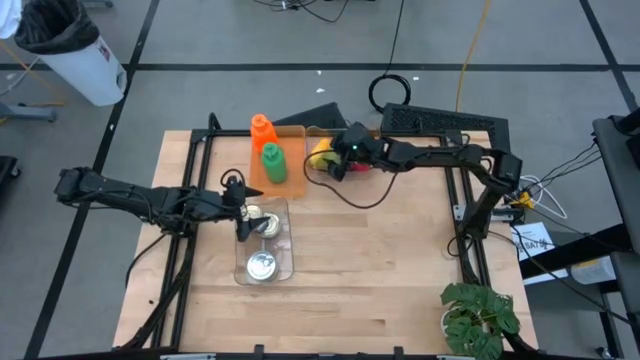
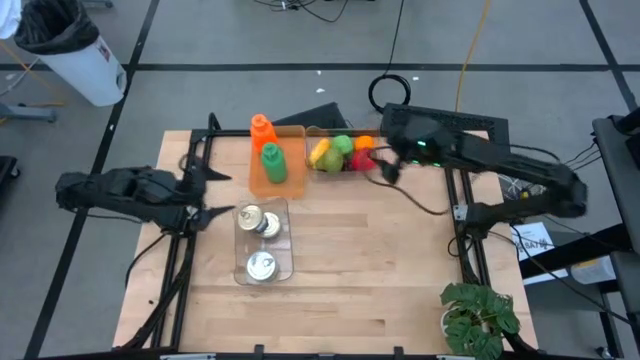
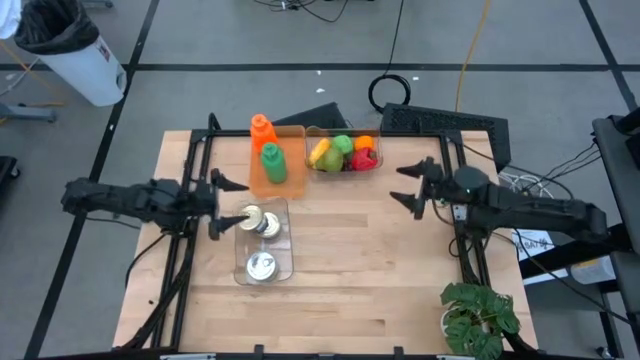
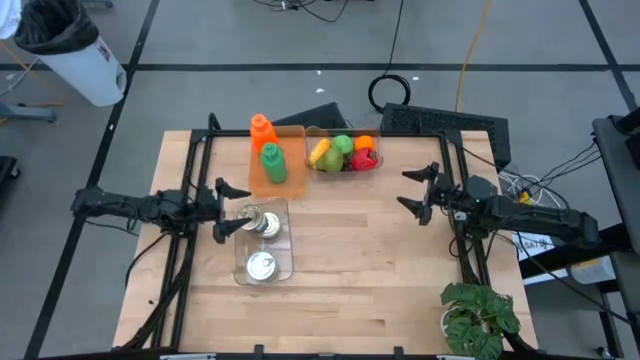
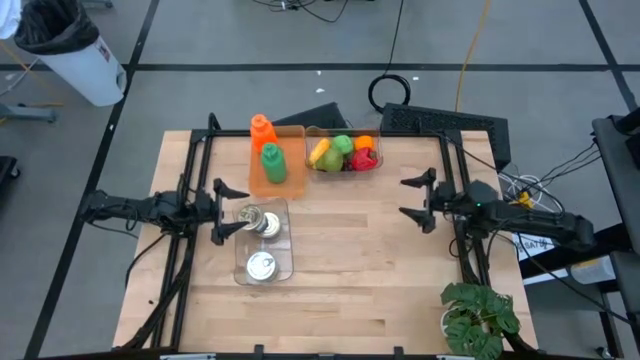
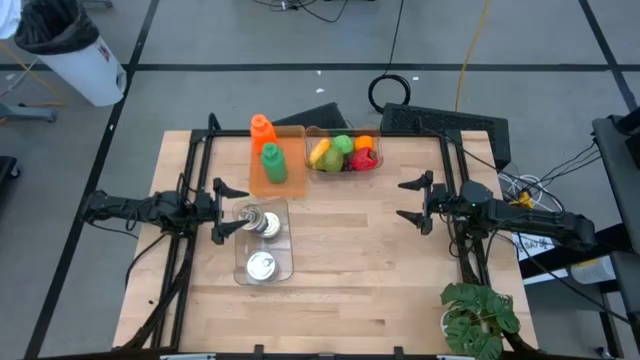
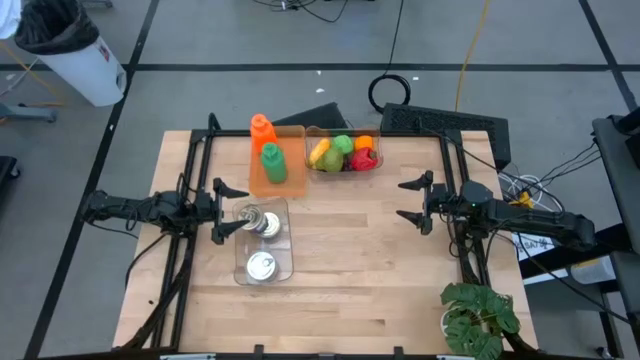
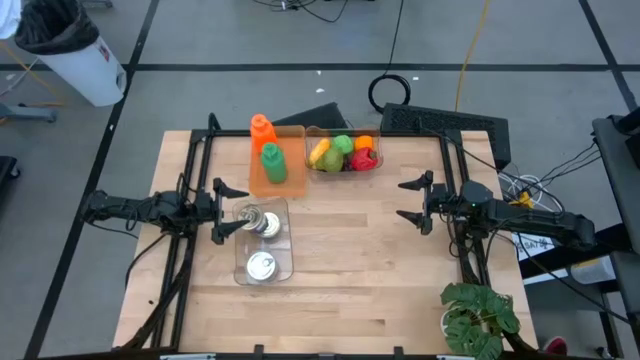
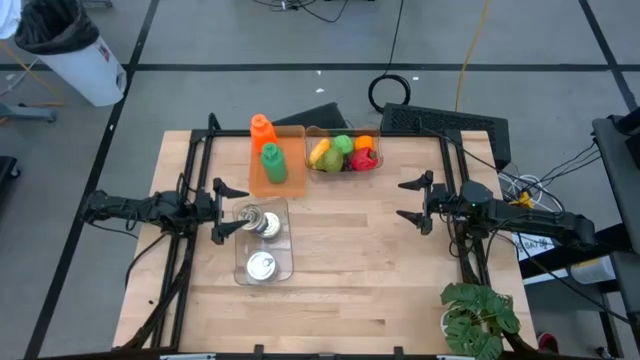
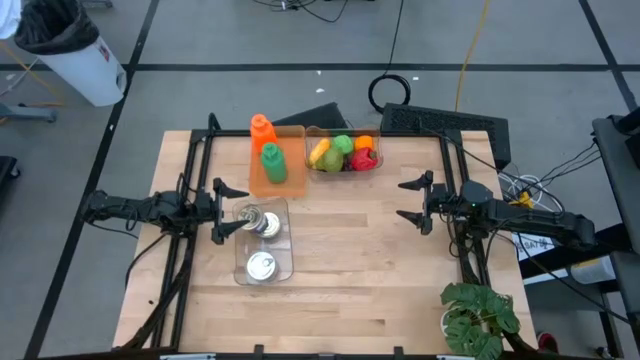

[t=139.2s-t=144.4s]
Task: Pick & Place Food Item
Return to Home Position

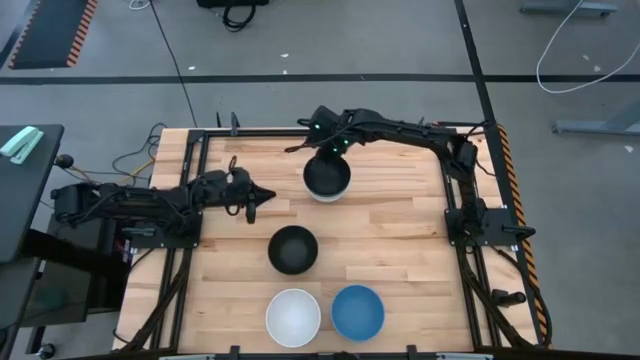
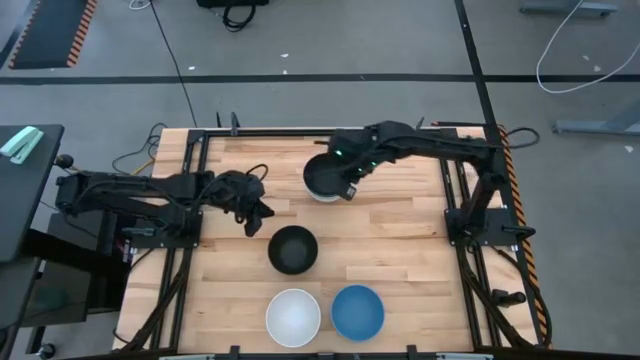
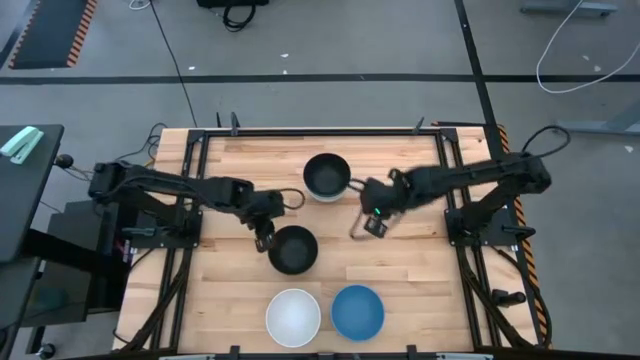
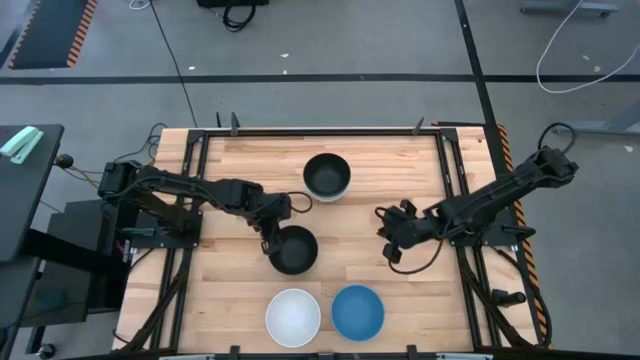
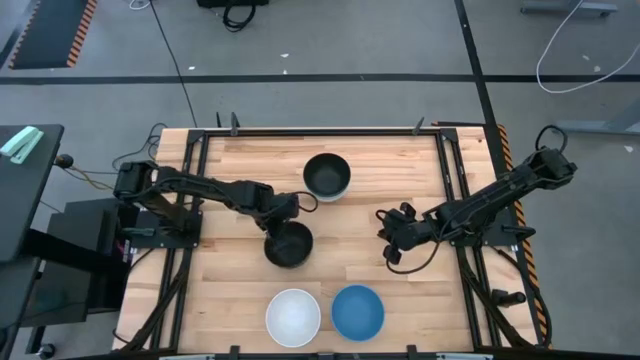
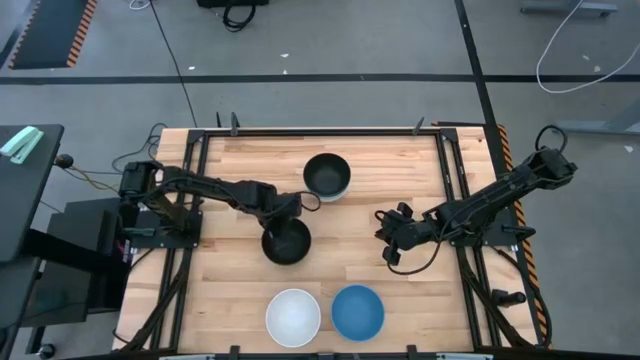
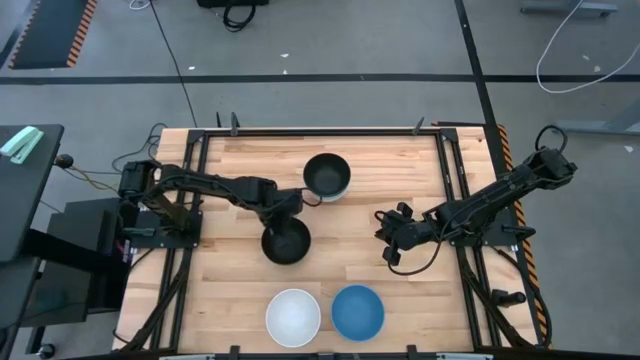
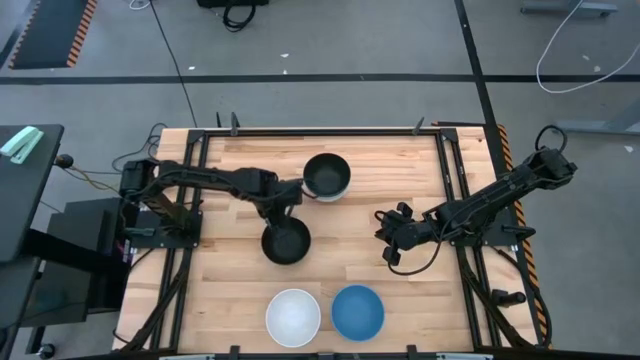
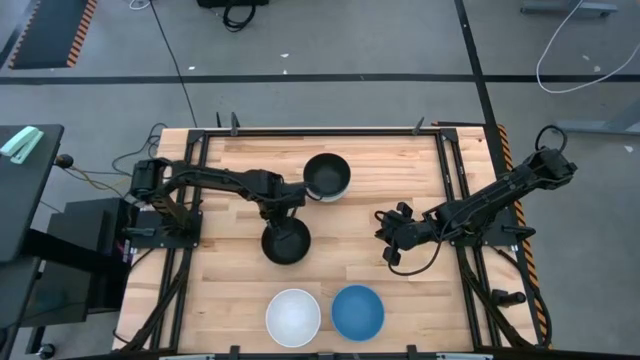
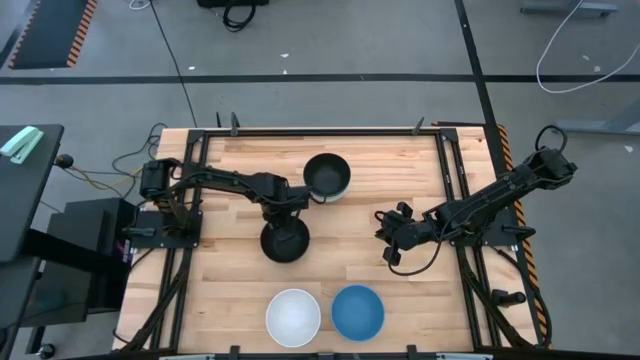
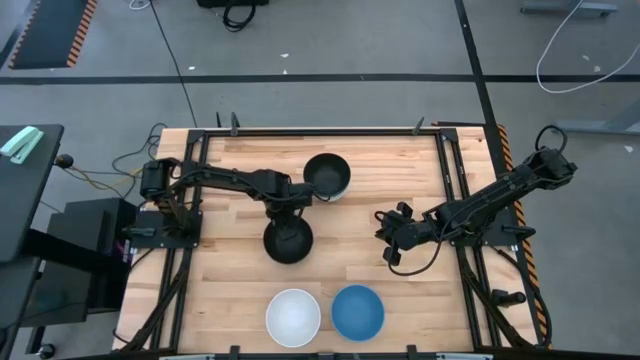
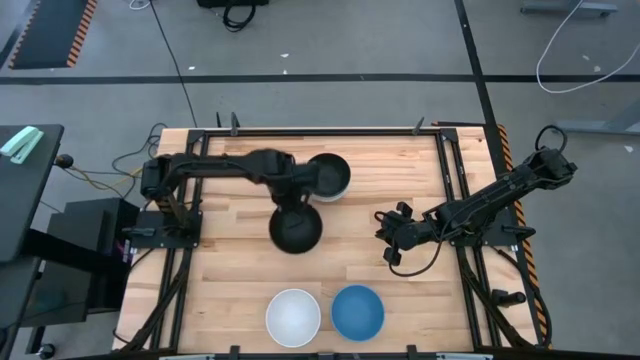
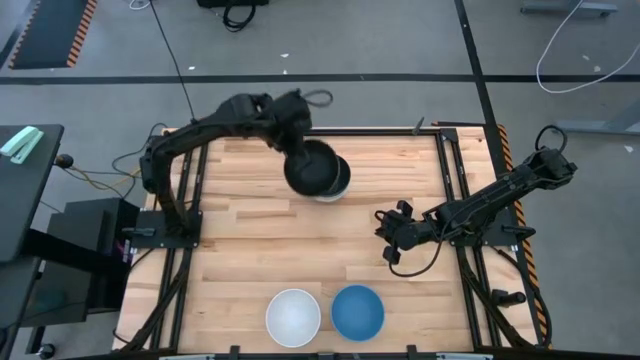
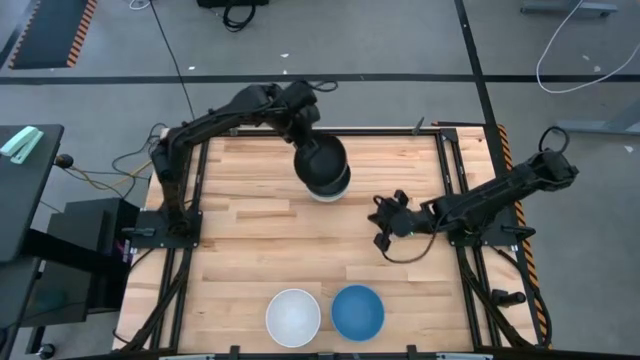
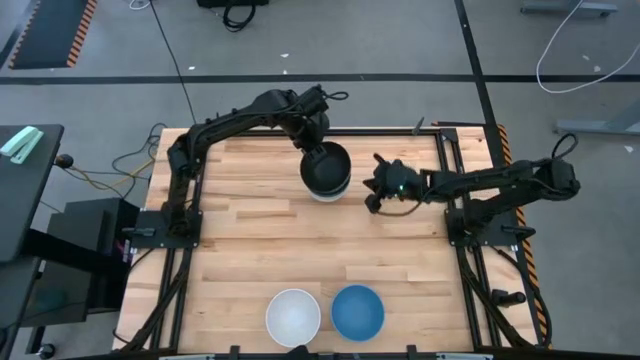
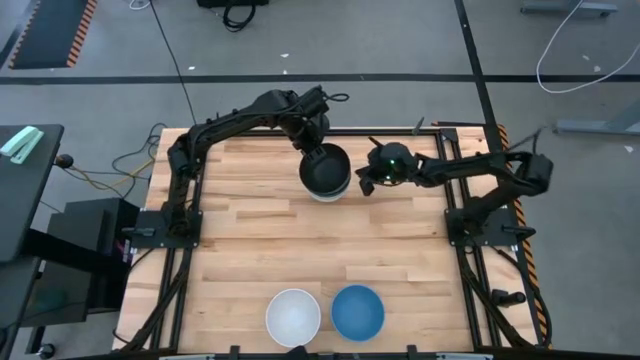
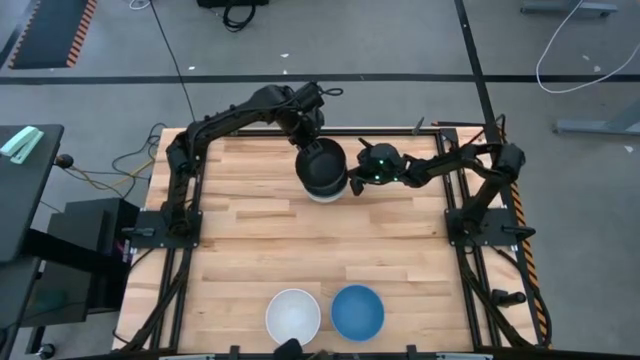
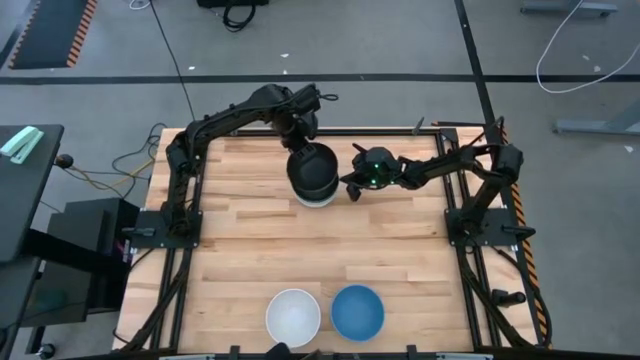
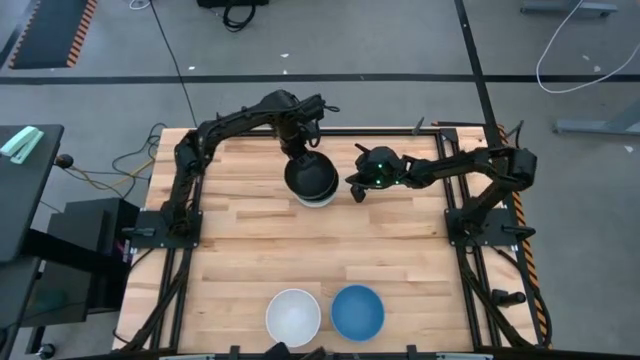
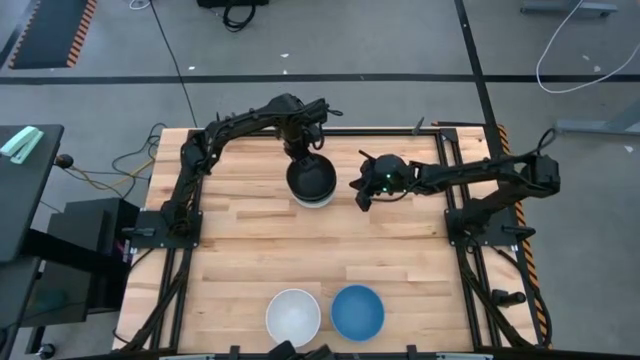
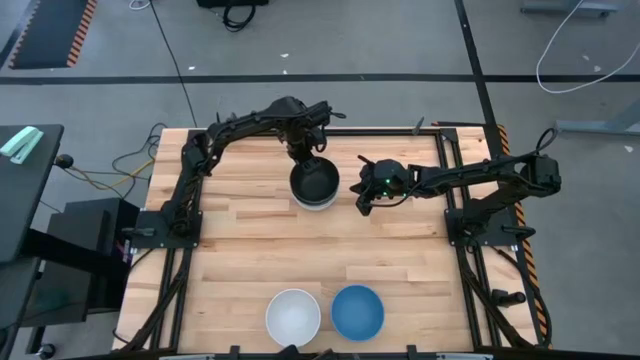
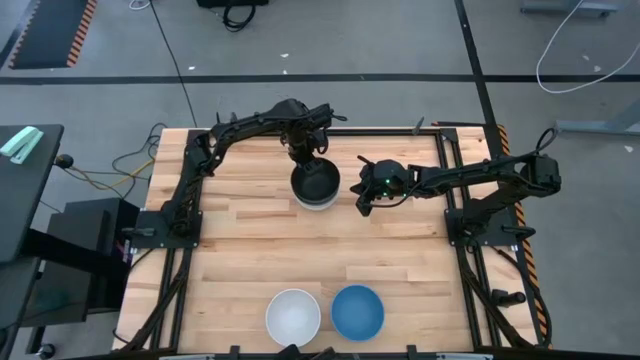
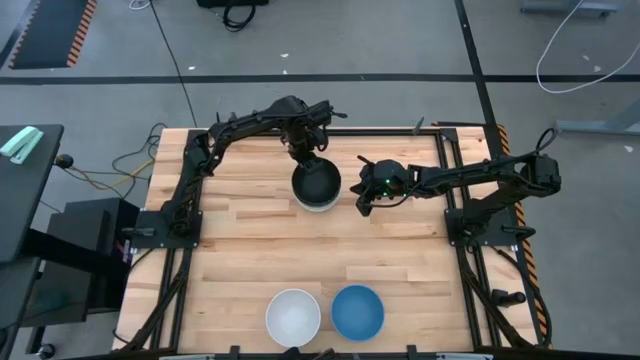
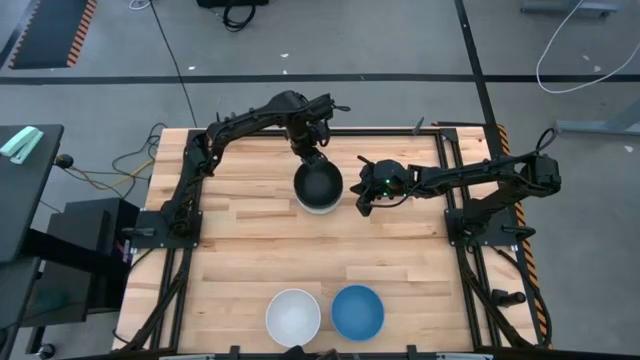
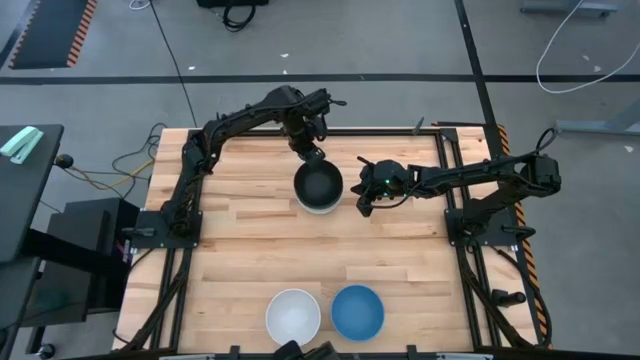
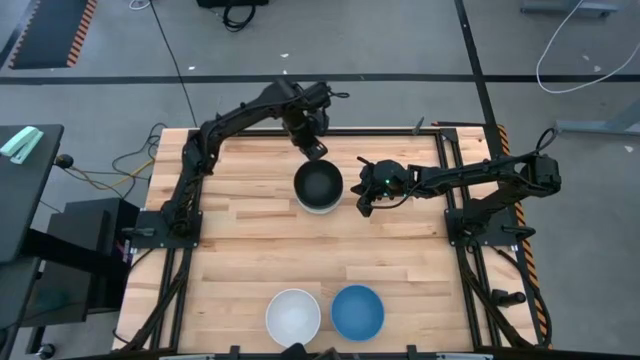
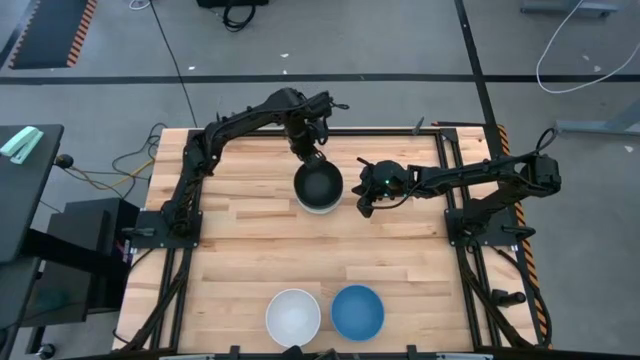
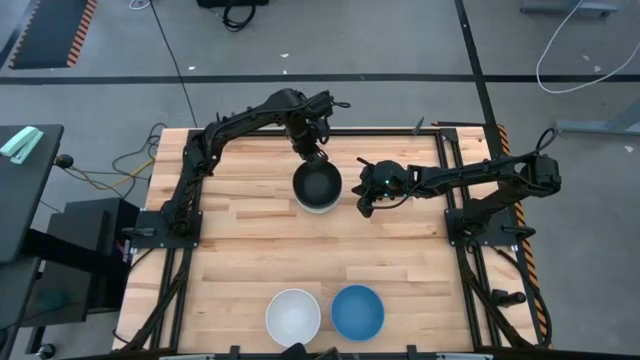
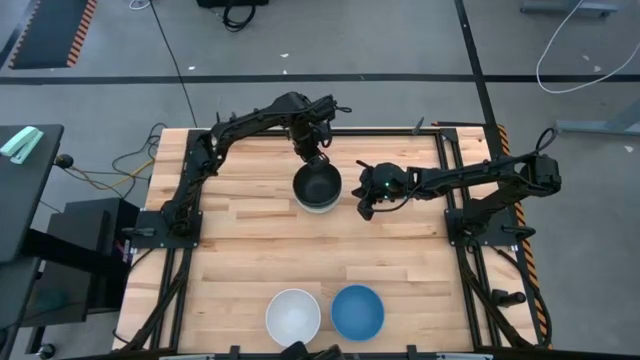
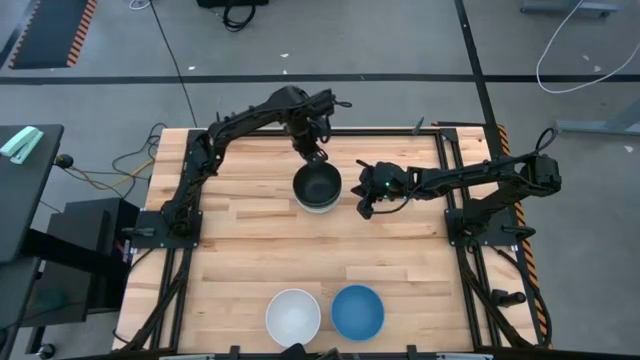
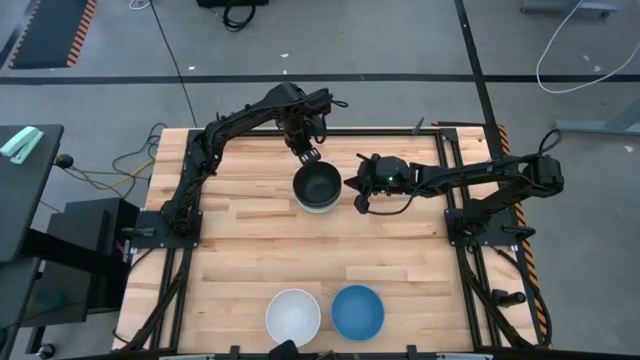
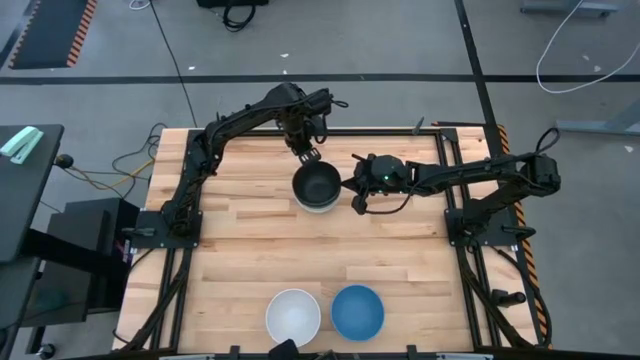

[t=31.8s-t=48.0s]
Task: Nest bowls inside each other
Stack the black bowl on top of the black bowl
